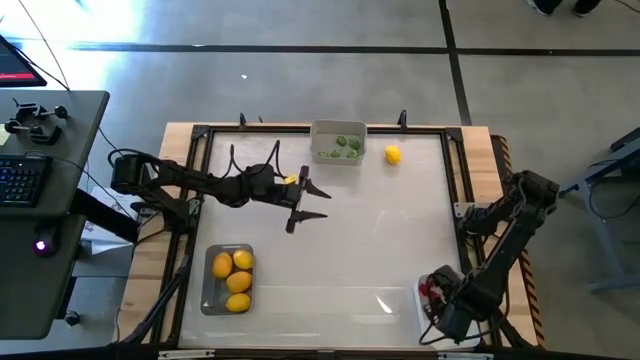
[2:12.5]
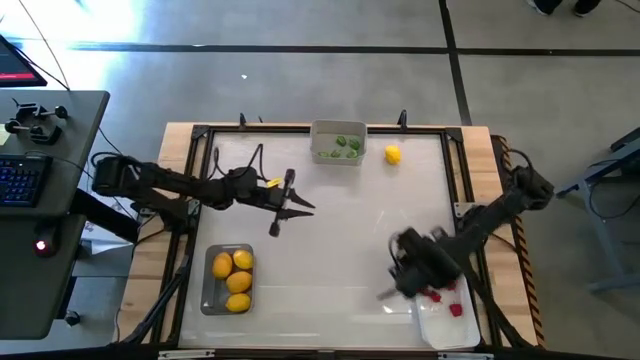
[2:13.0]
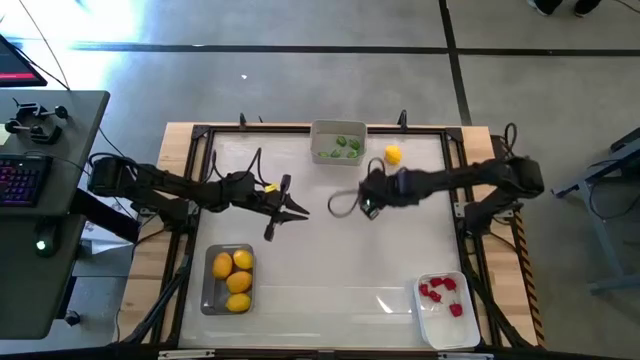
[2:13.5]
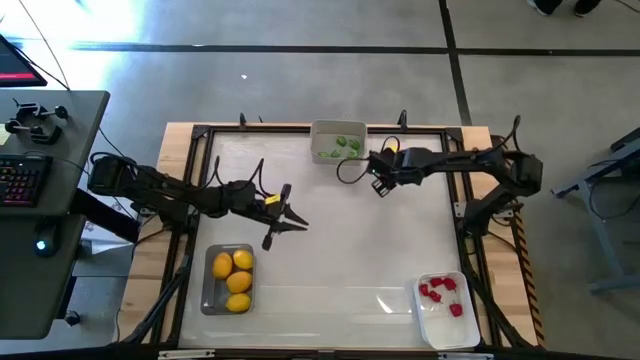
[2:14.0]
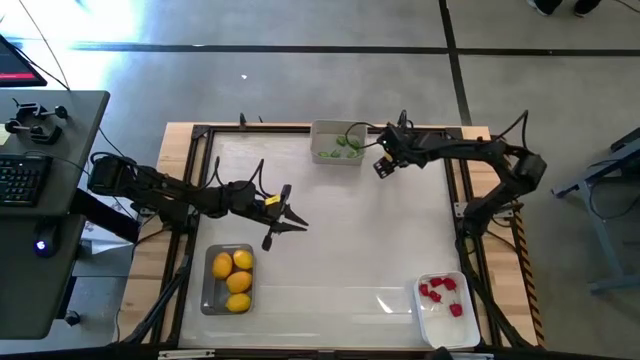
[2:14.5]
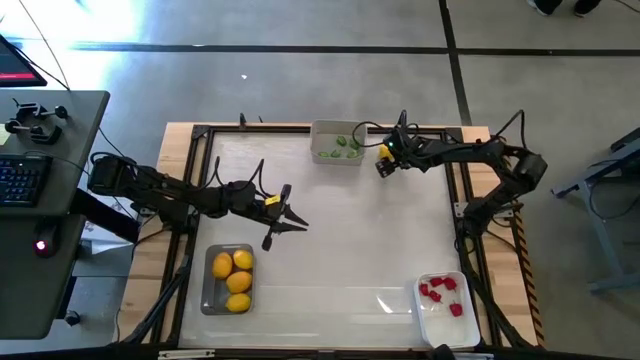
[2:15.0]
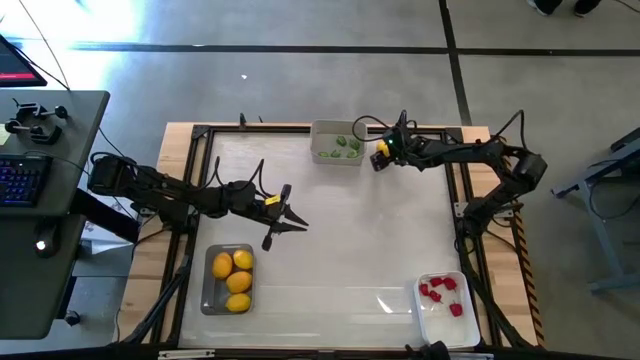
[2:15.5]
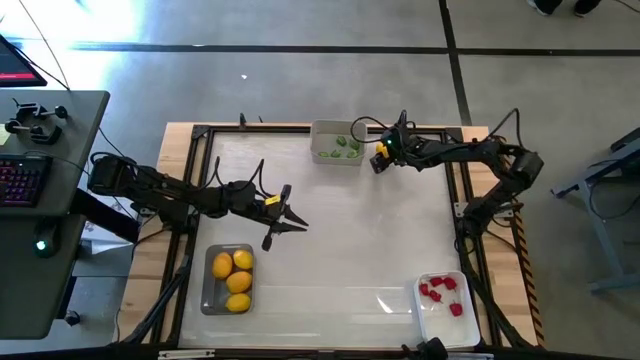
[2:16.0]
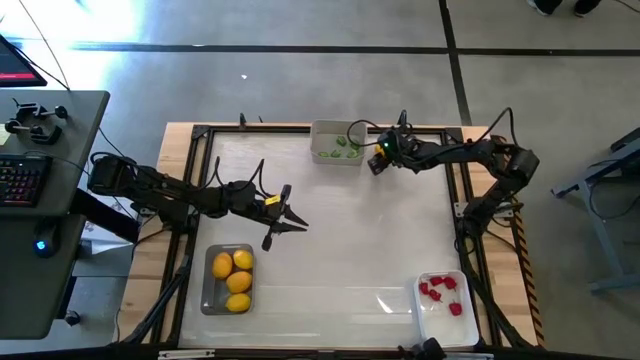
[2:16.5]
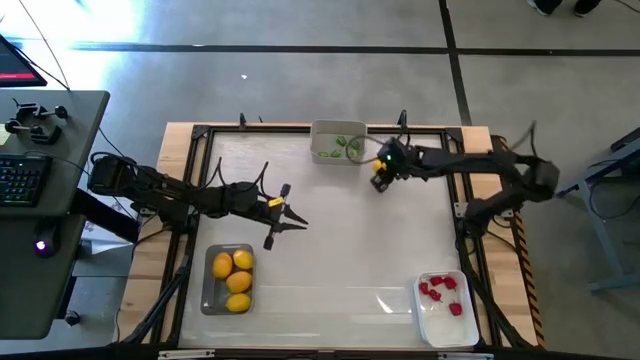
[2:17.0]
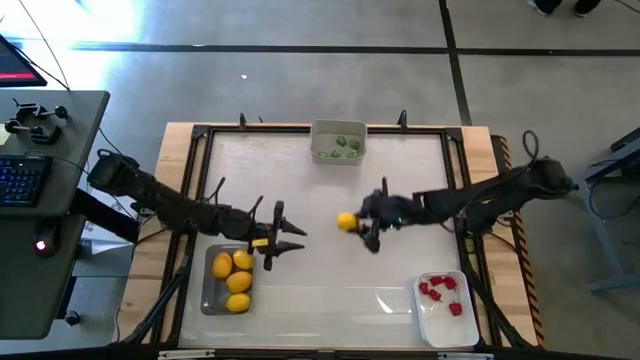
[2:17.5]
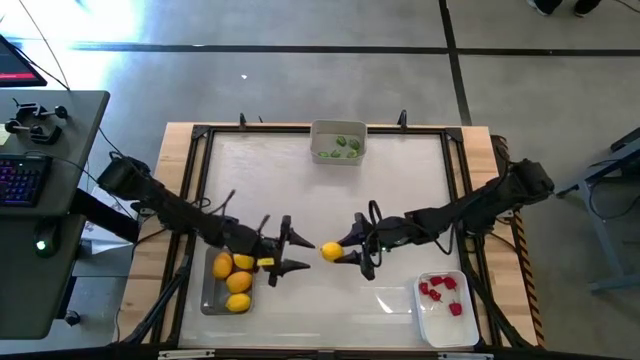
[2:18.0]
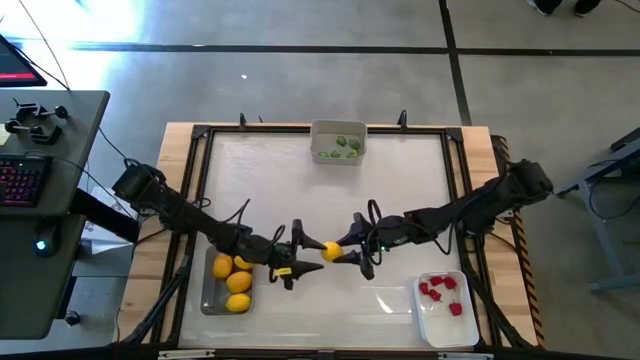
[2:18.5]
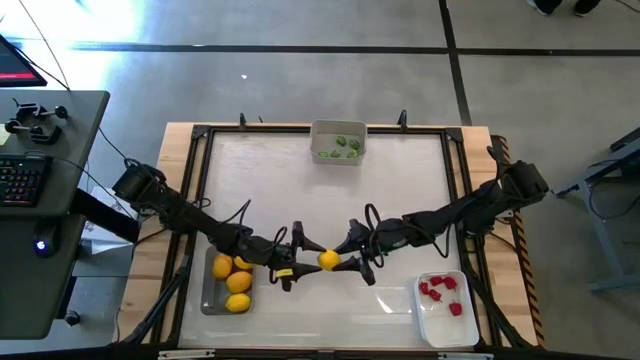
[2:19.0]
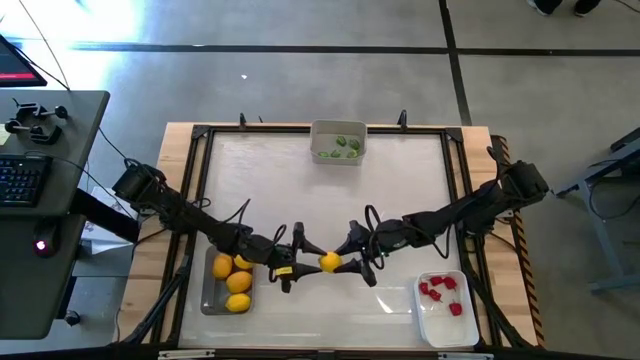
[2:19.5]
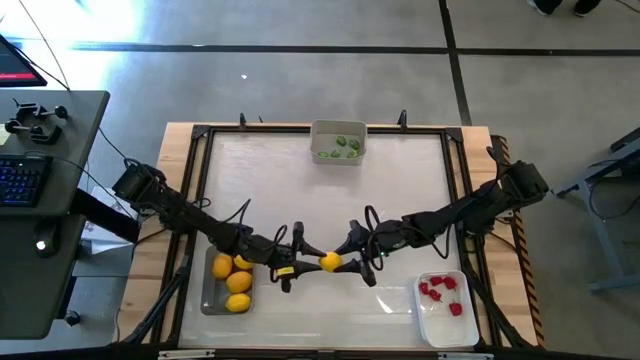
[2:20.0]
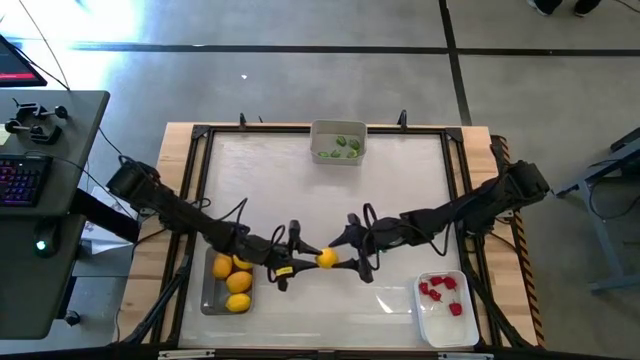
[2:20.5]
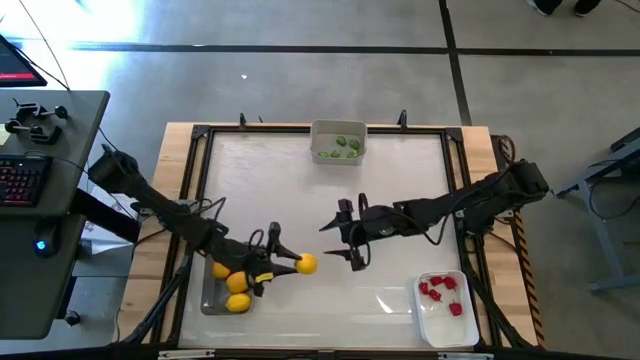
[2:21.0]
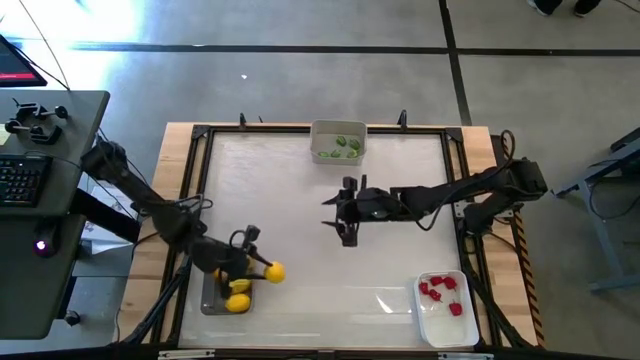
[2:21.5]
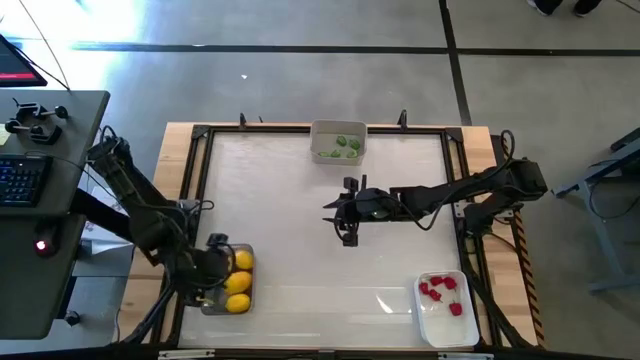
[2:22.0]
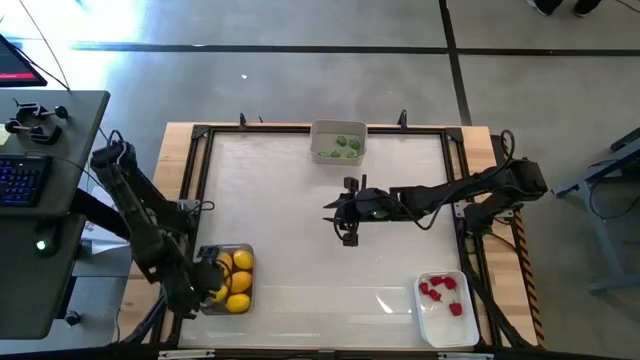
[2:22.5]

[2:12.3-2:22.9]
Task: Sort produce into baskets
Put the lemon into the black bin

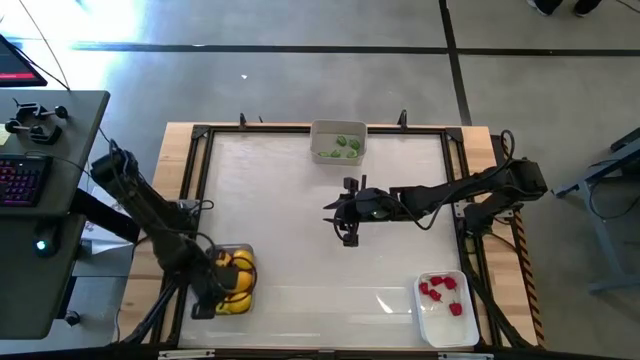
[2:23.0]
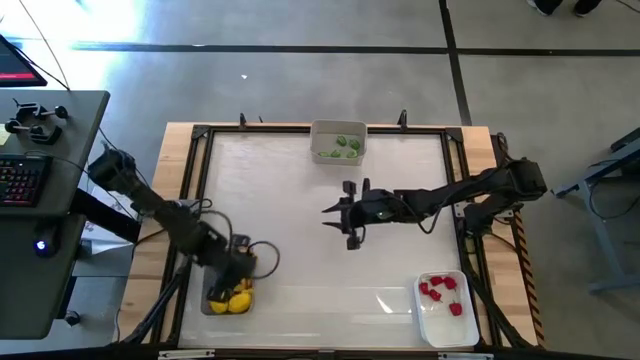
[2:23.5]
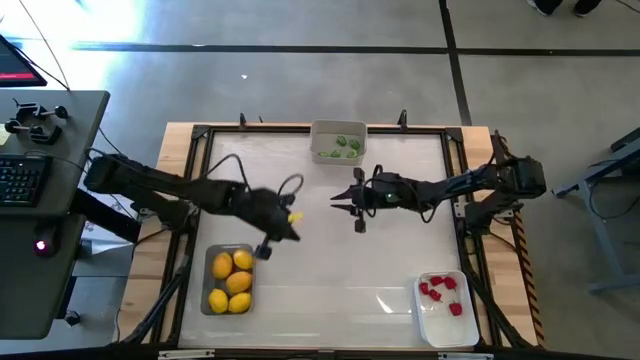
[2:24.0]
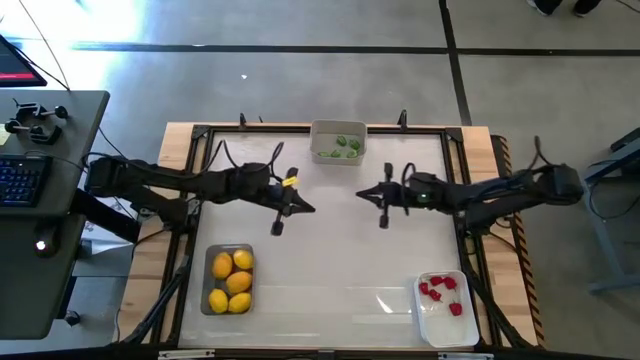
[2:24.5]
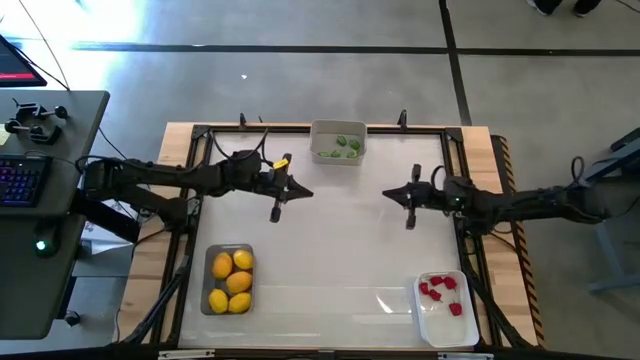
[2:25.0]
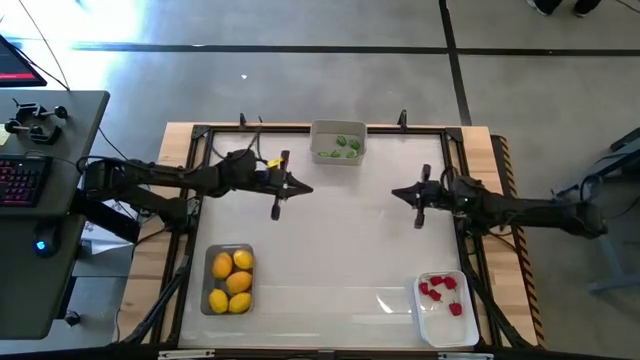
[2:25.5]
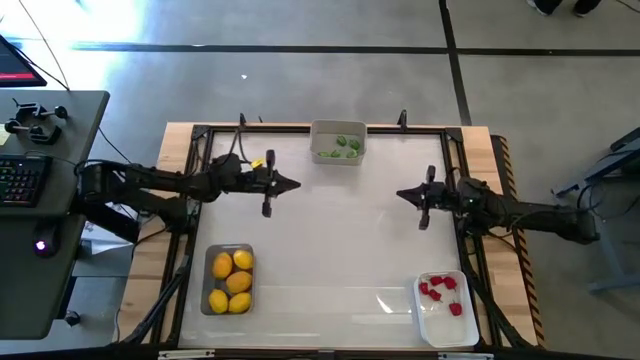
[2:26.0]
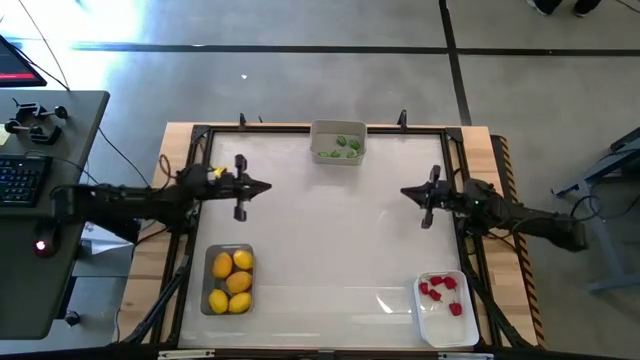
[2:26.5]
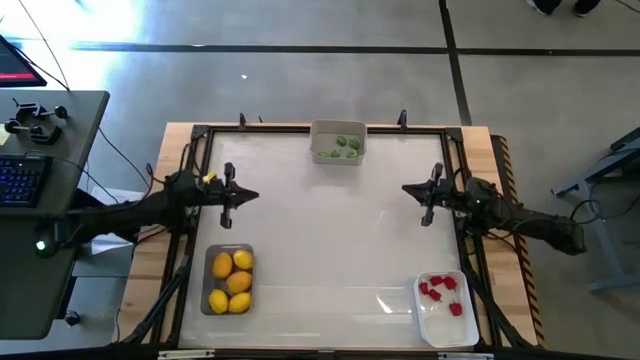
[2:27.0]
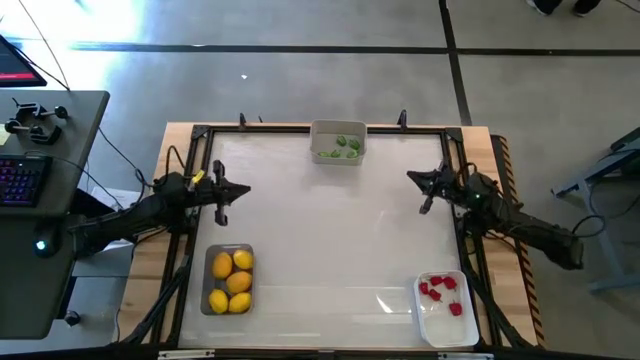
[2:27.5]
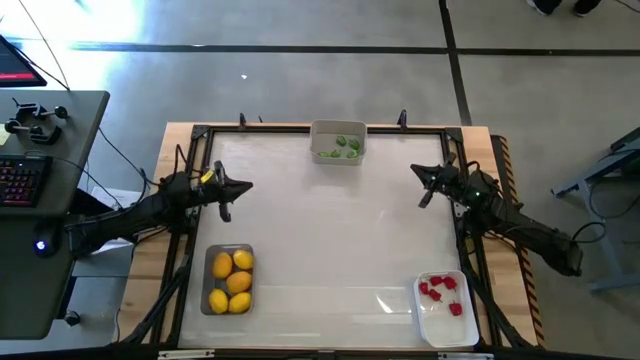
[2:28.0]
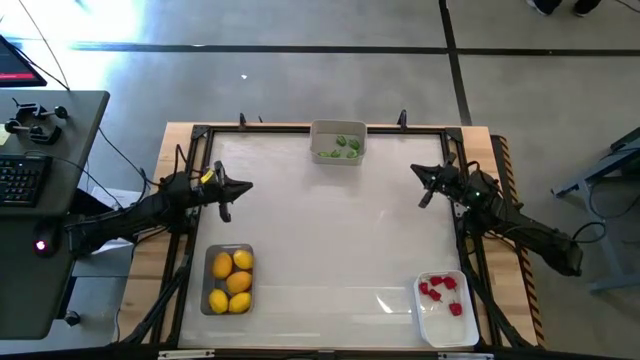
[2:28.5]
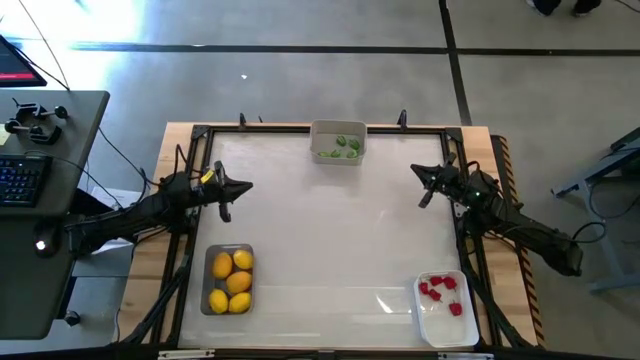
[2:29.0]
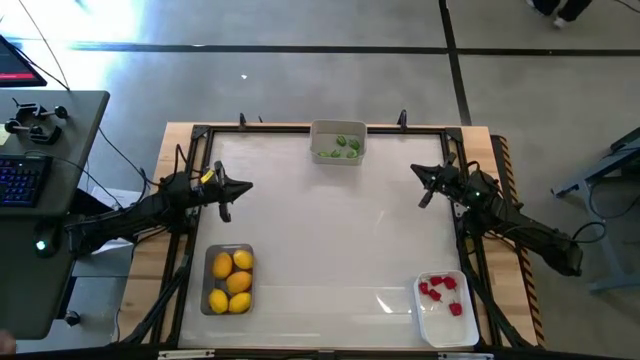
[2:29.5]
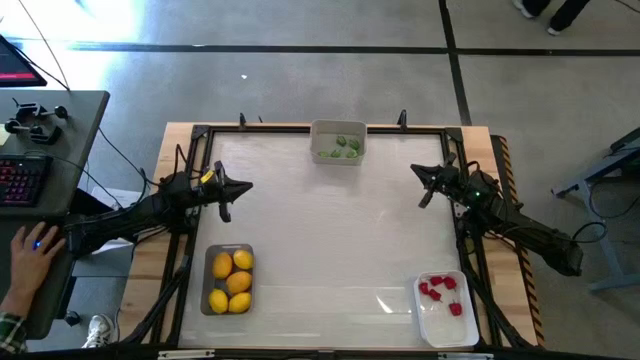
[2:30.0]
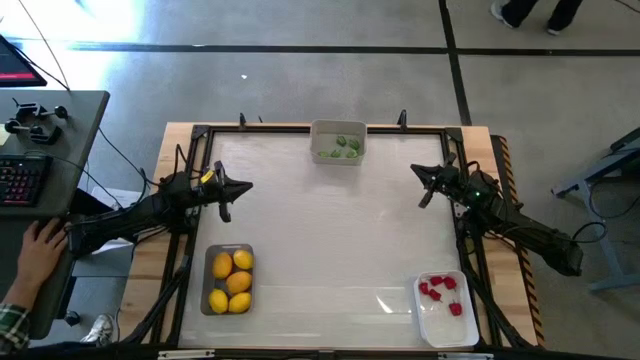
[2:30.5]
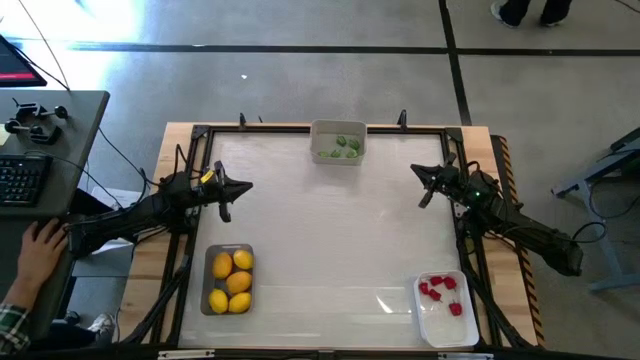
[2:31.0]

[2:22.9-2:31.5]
Return to Home Position

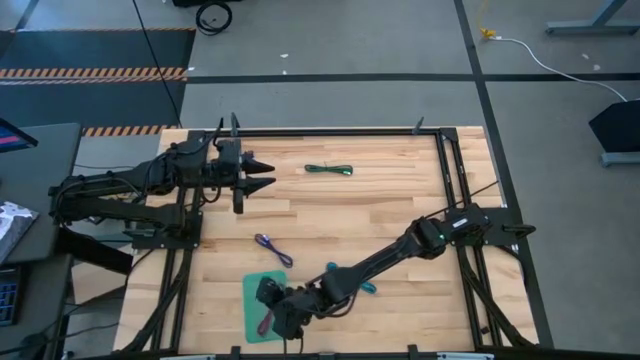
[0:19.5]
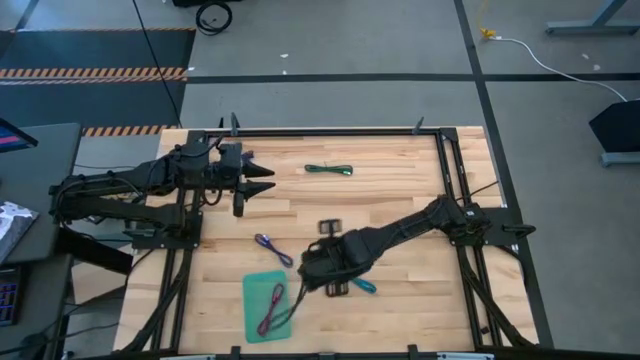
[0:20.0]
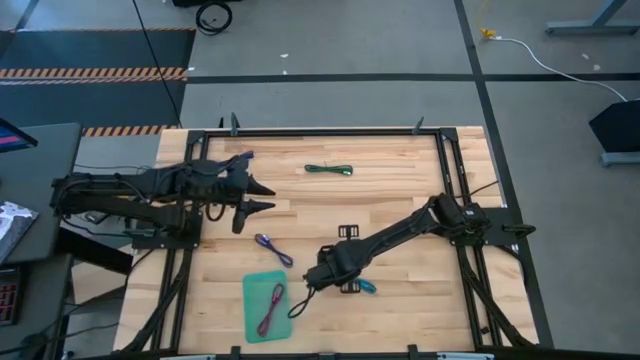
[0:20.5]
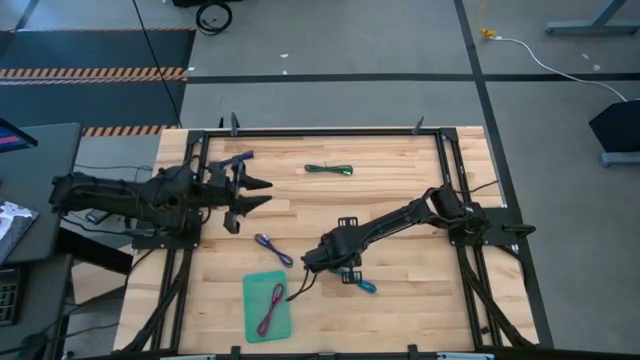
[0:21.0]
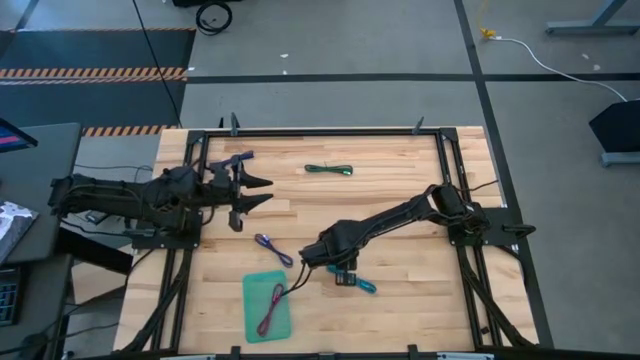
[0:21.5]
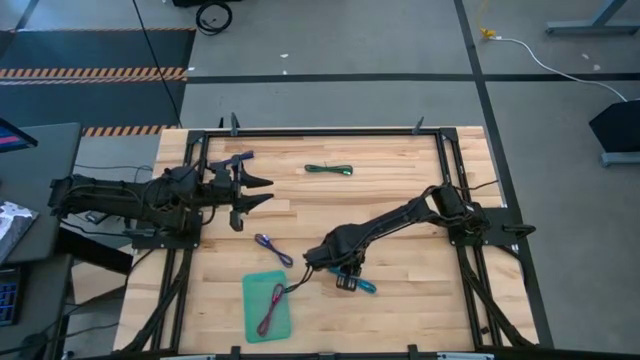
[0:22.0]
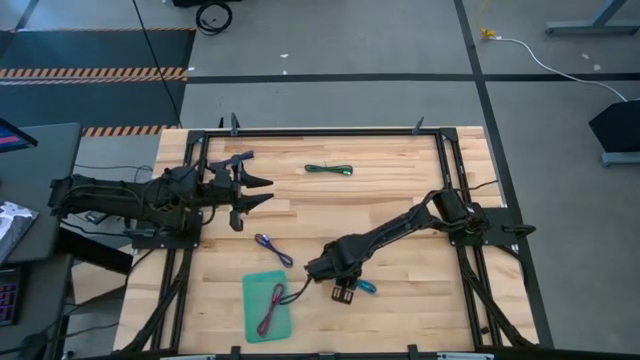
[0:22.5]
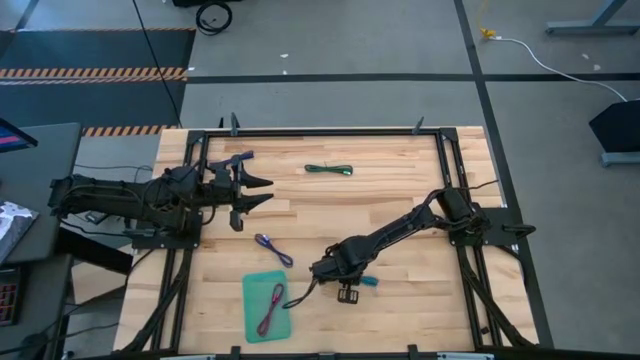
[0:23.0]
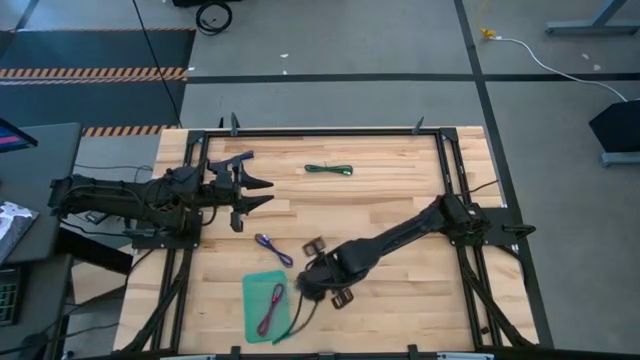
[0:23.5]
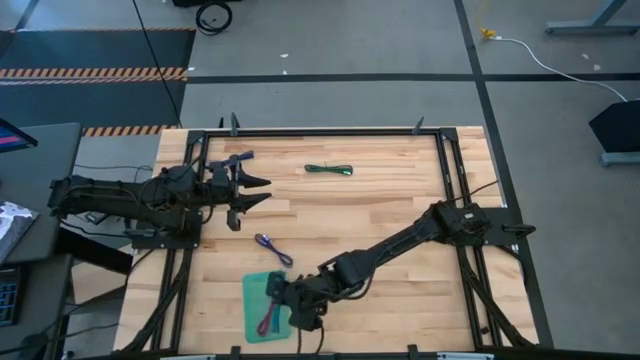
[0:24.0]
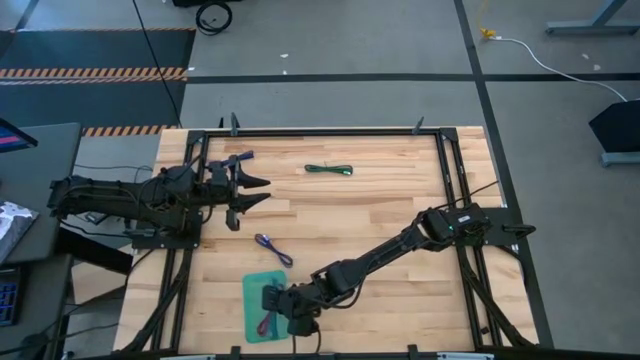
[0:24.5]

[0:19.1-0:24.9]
Task: Pick and place USB-C Cables
Put the blue charger cable into the green bin
